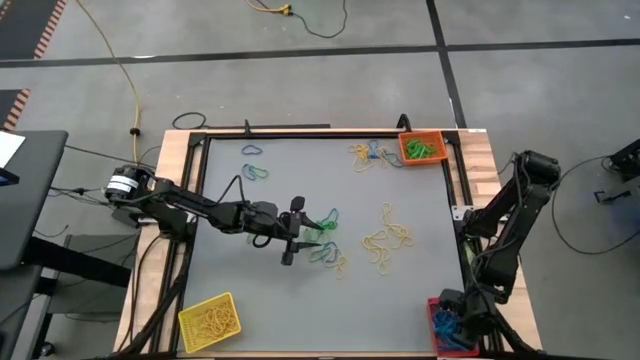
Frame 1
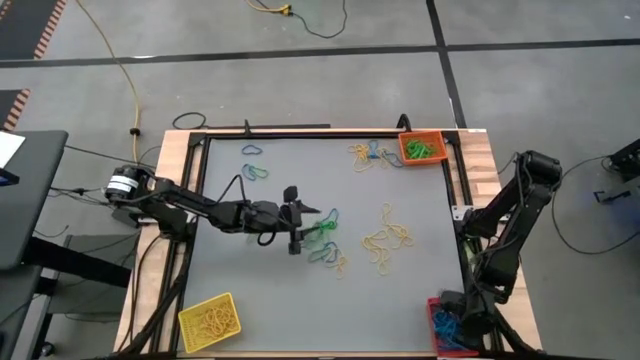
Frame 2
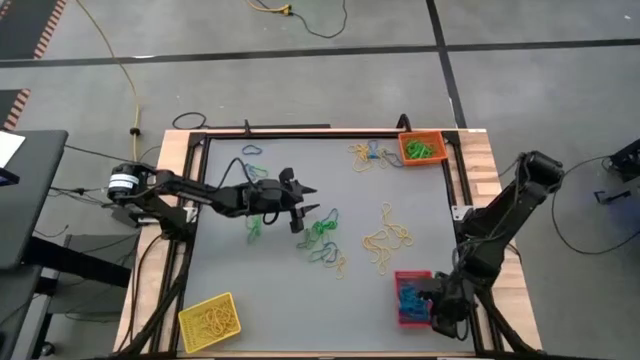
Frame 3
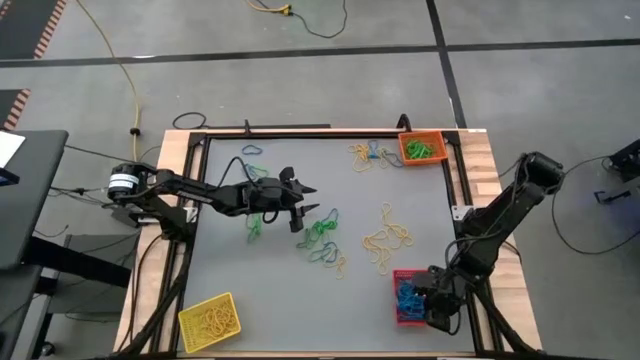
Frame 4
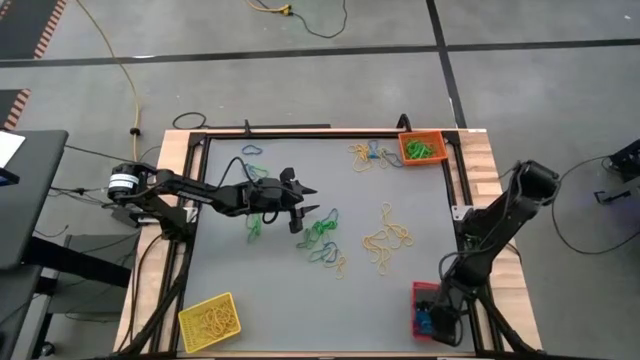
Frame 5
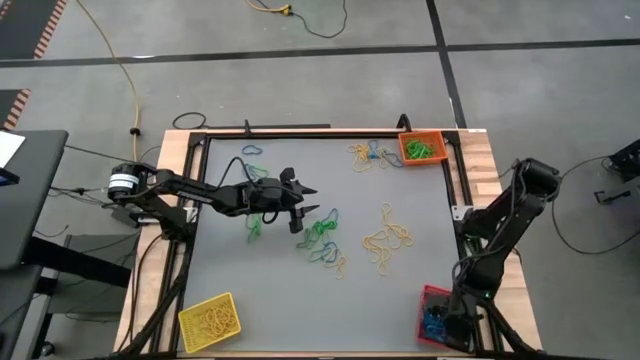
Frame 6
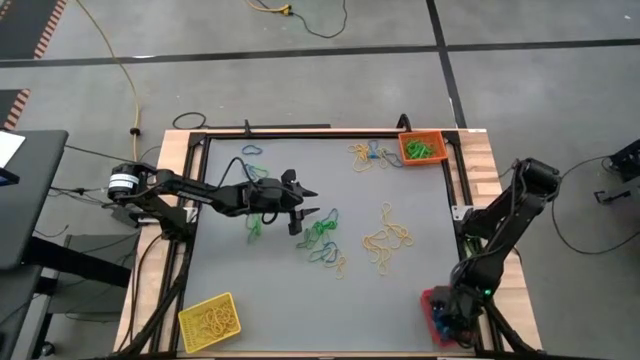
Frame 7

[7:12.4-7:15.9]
Task: Sort rubber bands into baskets
Adjust the red bin

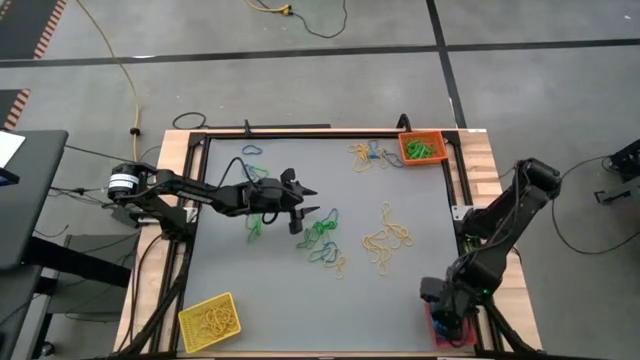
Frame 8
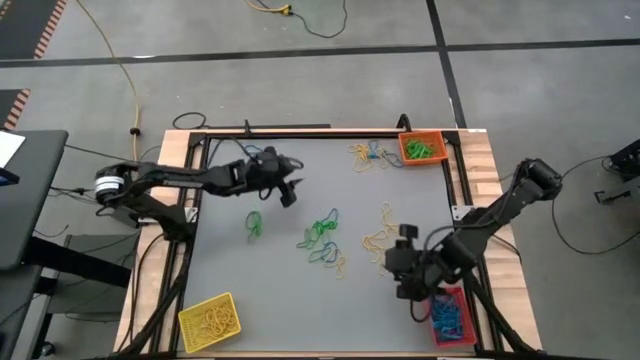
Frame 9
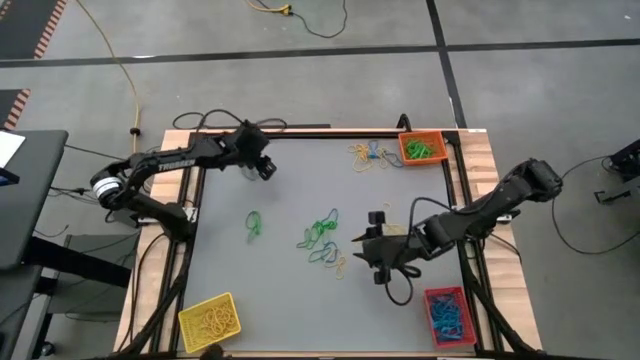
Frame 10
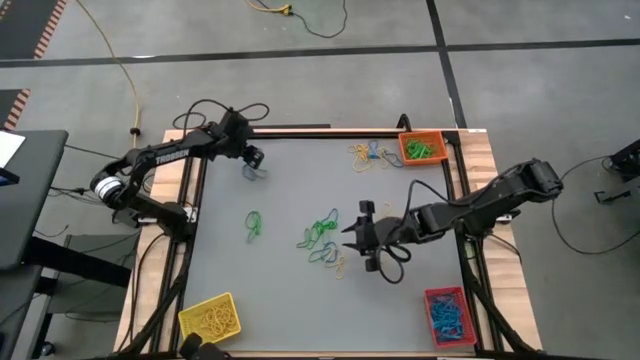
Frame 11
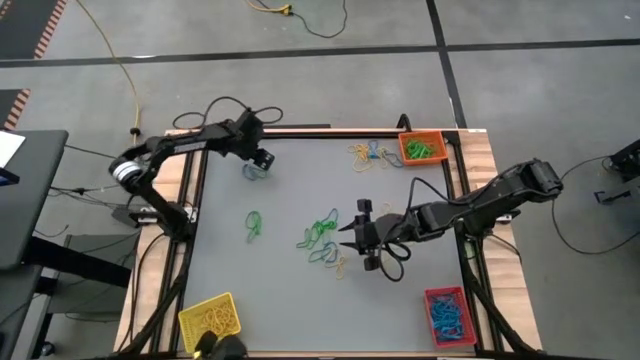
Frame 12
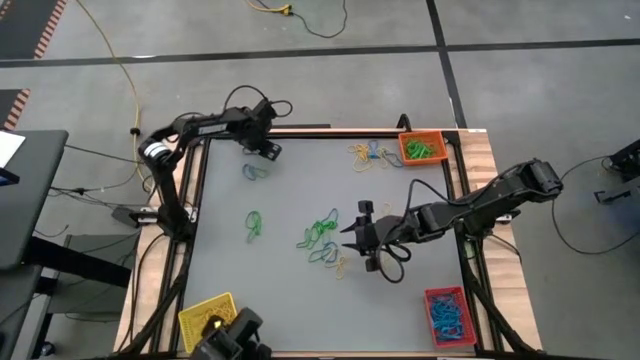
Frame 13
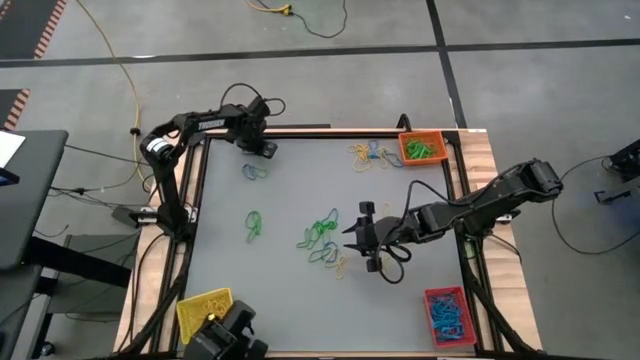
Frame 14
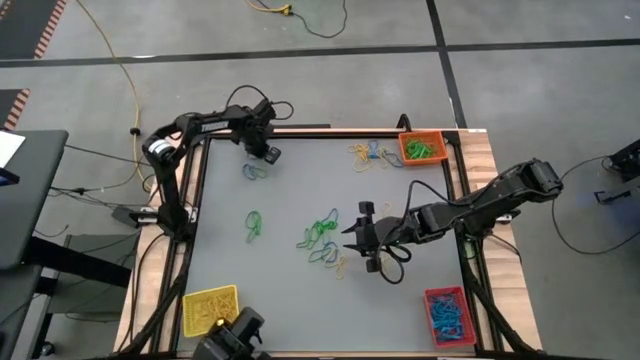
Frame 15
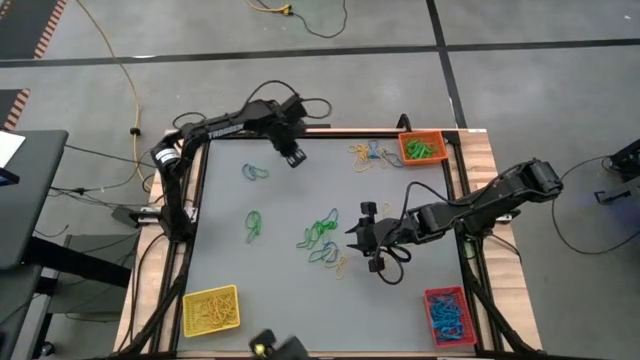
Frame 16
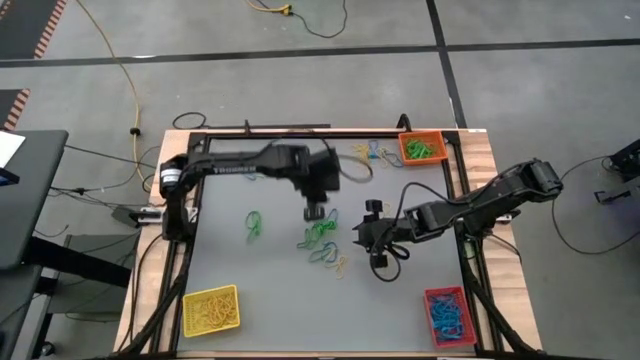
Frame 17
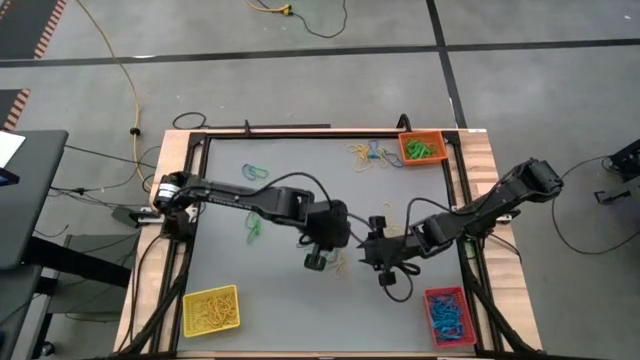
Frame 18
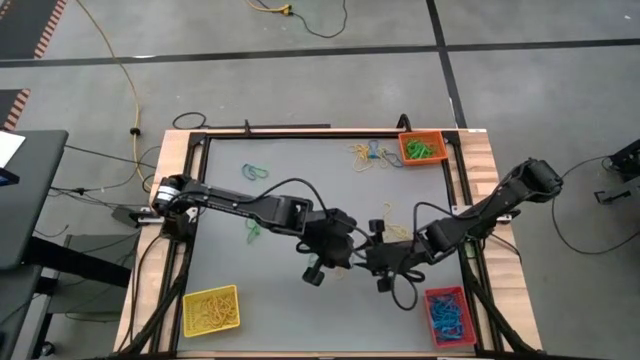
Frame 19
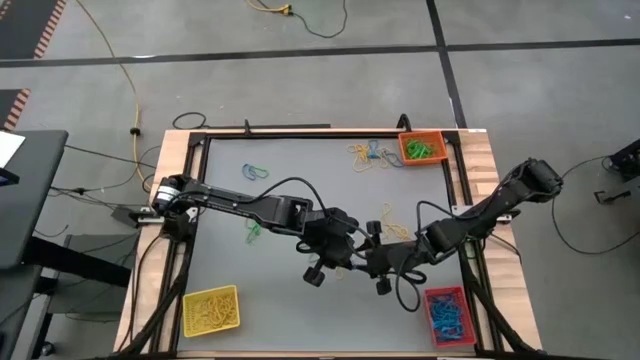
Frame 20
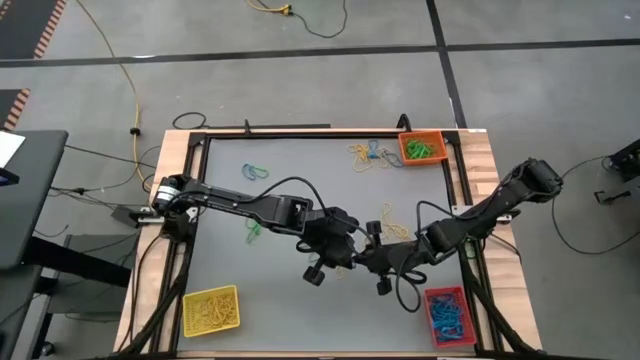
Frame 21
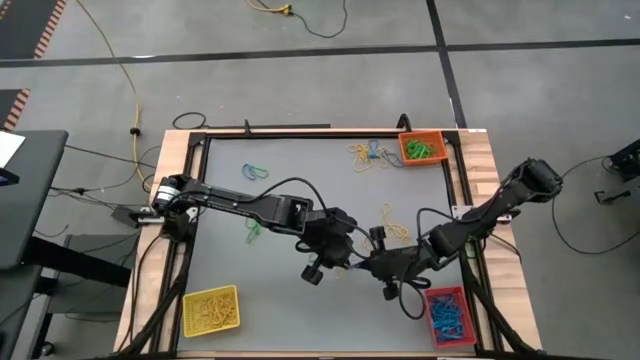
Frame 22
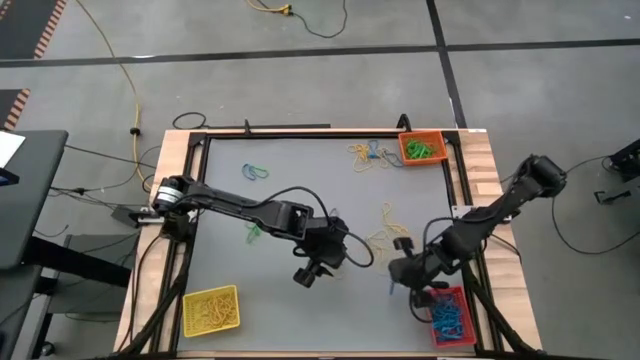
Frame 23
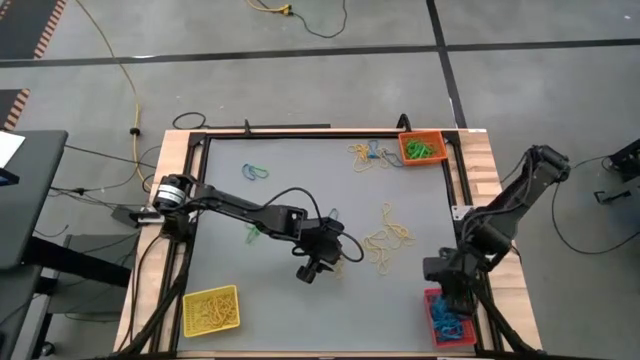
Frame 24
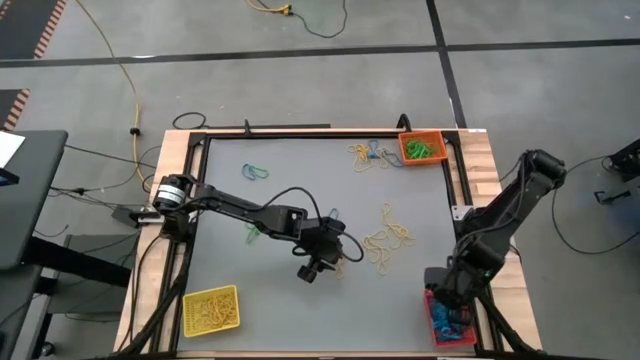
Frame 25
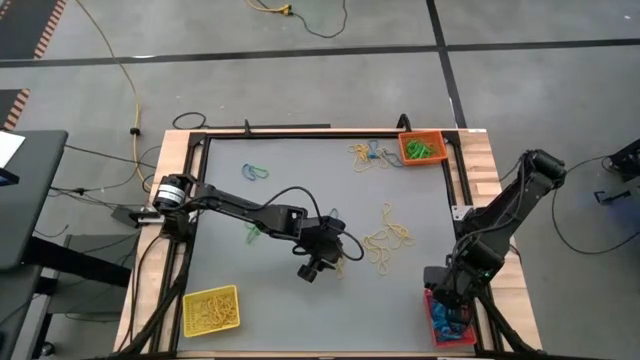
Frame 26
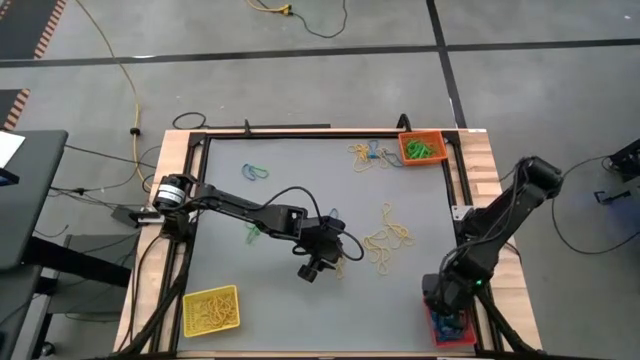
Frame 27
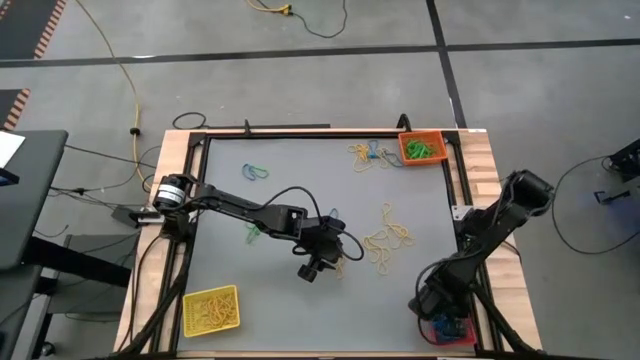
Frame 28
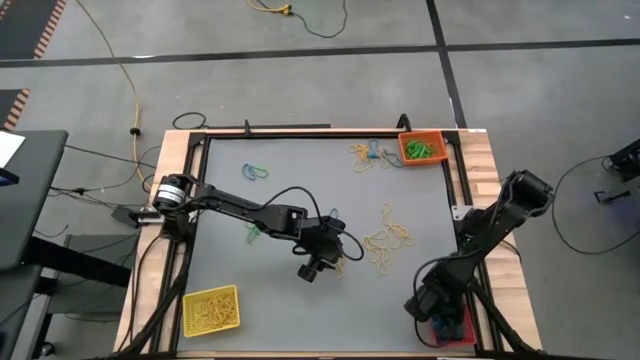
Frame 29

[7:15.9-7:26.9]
Put the blue rubber band into the red bin

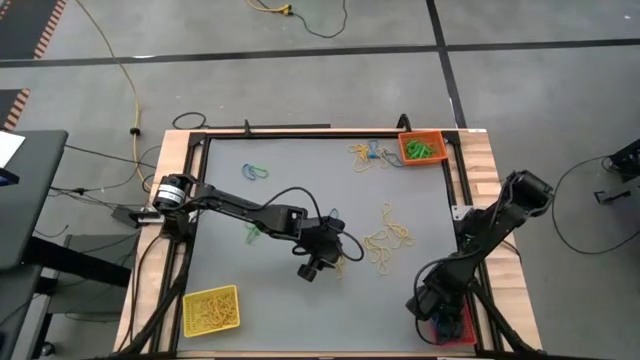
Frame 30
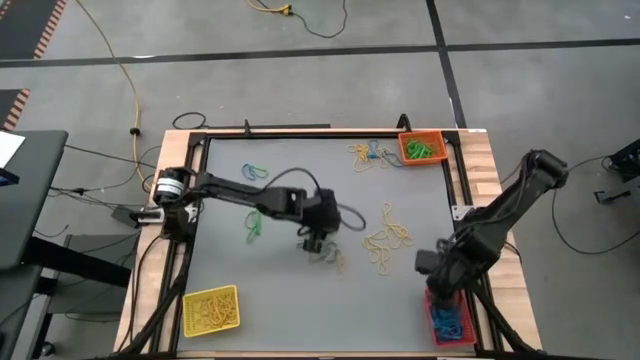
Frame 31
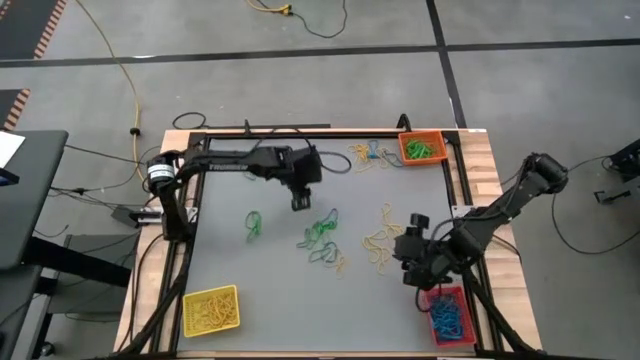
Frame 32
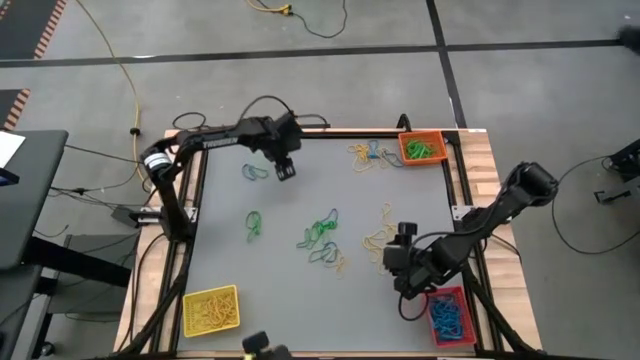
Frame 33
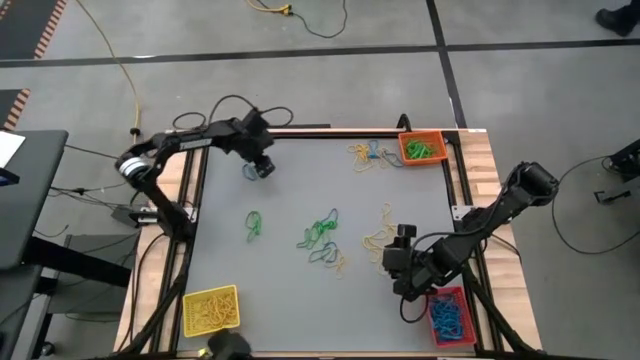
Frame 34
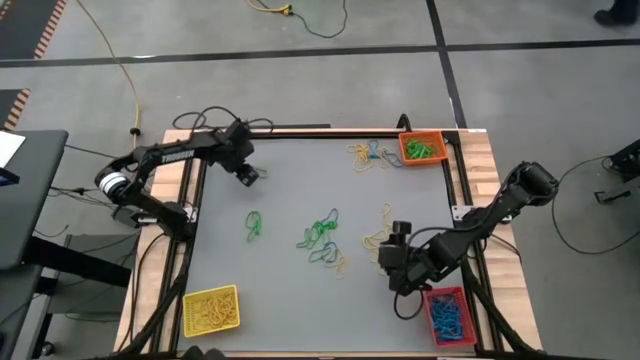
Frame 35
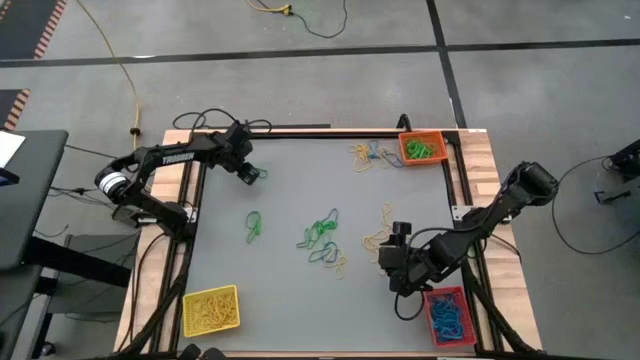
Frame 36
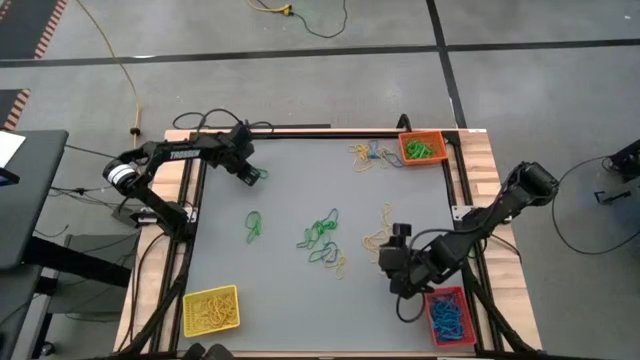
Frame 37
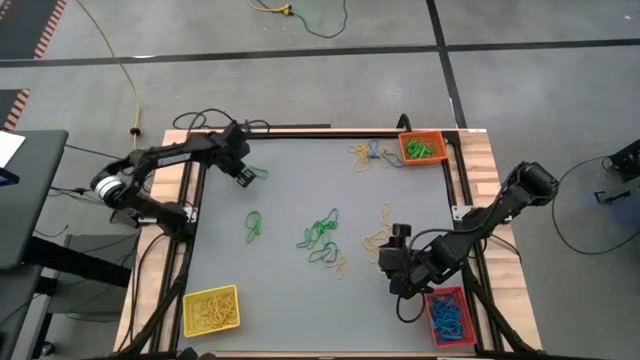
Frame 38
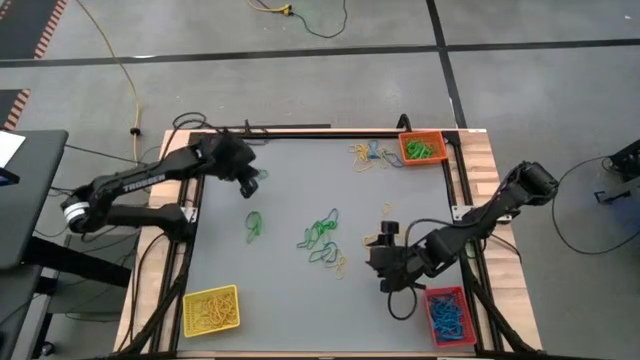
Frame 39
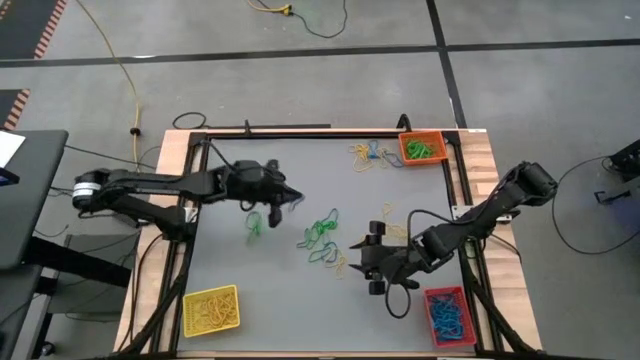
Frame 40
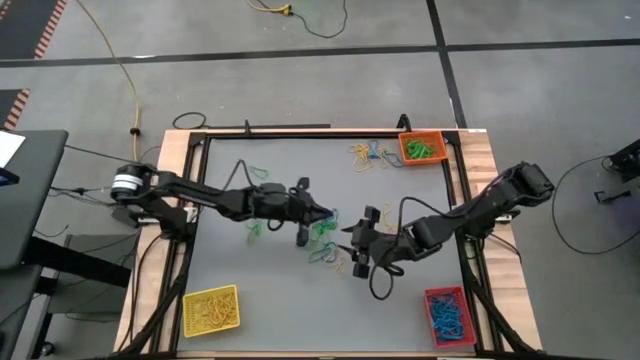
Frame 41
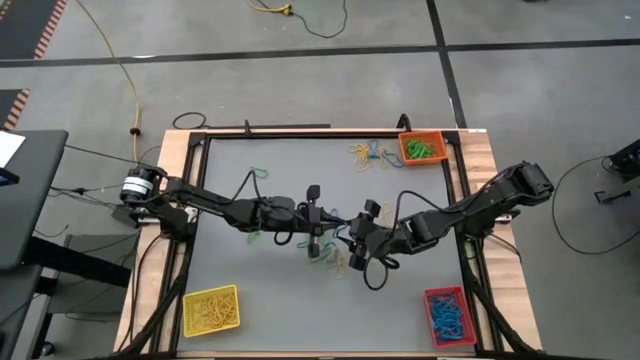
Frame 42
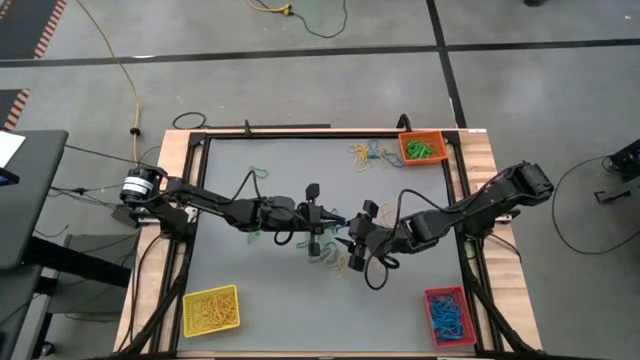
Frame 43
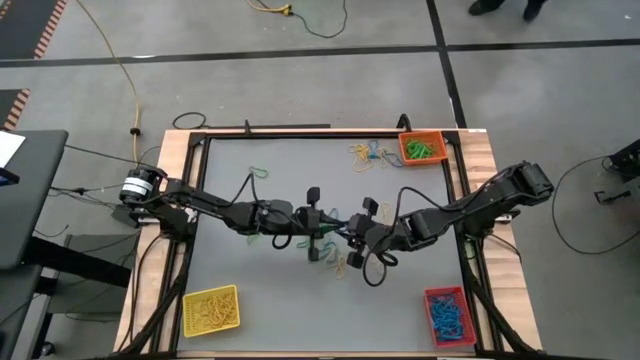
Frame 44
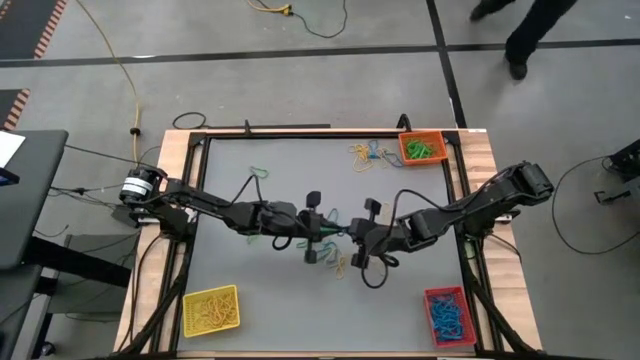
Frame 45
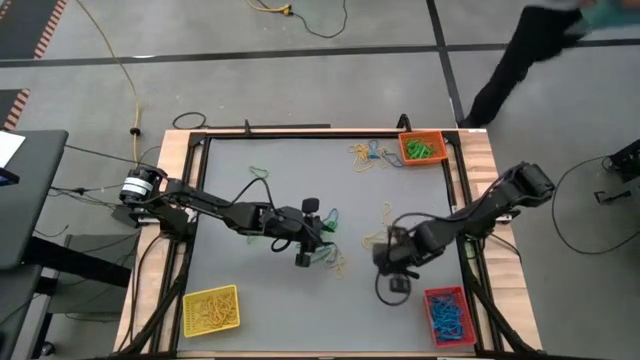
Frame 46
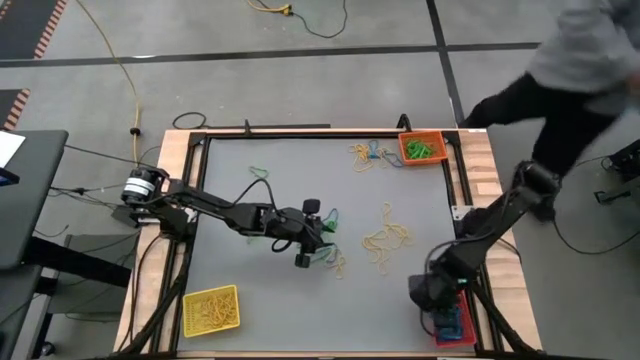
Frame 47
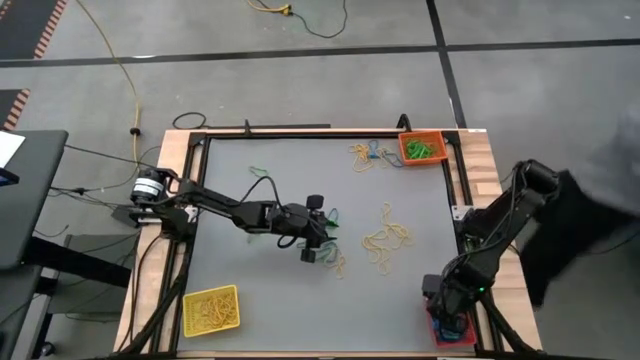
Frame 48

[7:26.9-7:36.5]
Put the blue rubber band into the red bin
